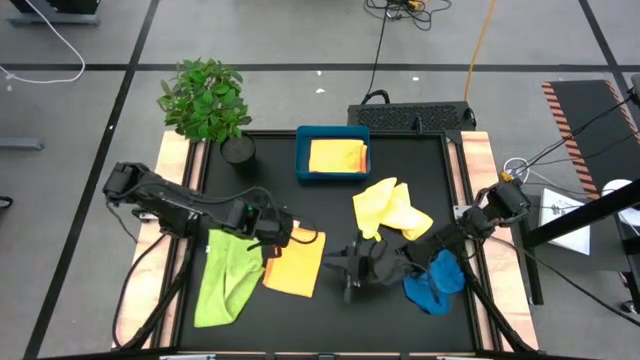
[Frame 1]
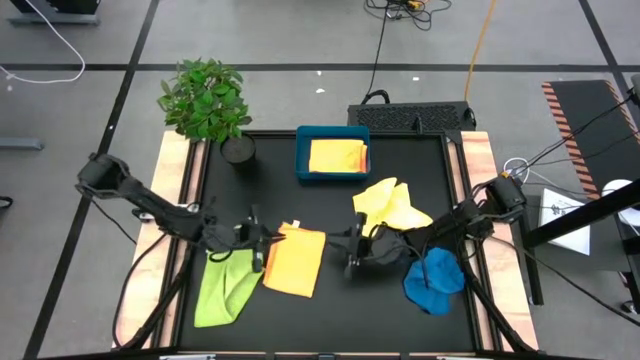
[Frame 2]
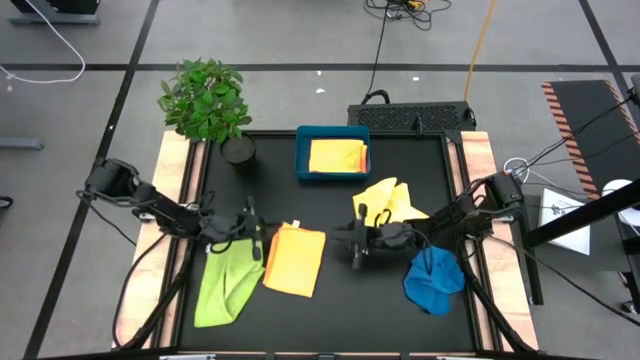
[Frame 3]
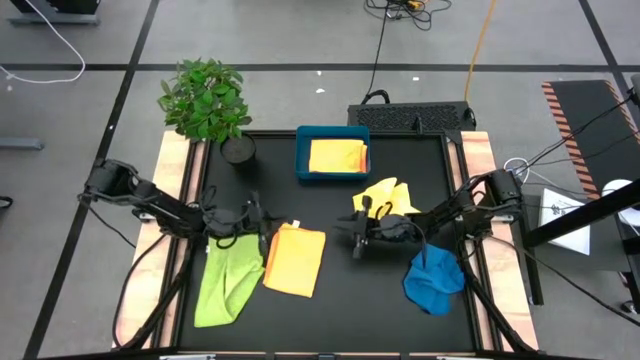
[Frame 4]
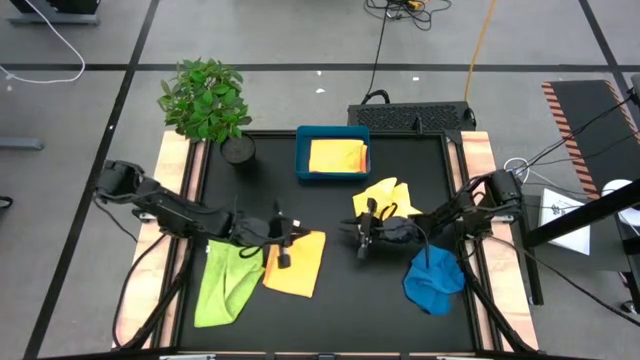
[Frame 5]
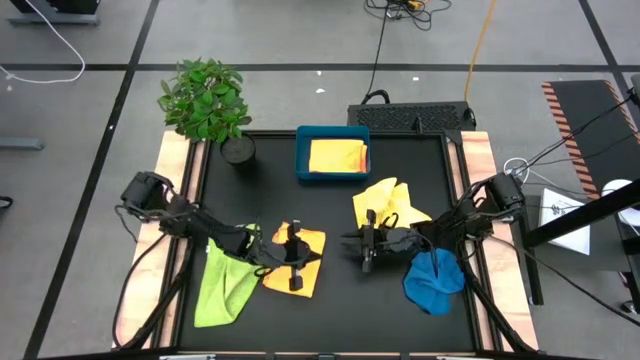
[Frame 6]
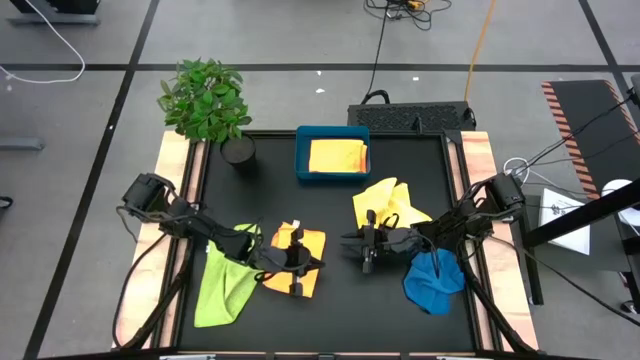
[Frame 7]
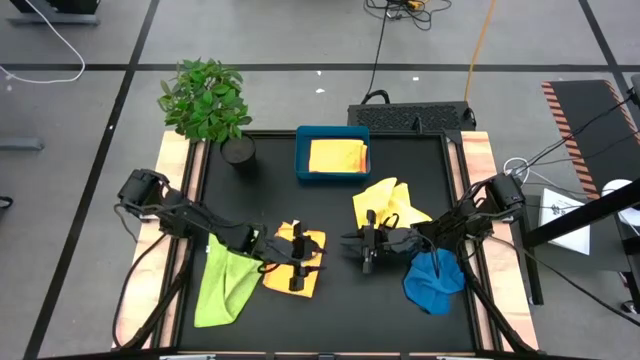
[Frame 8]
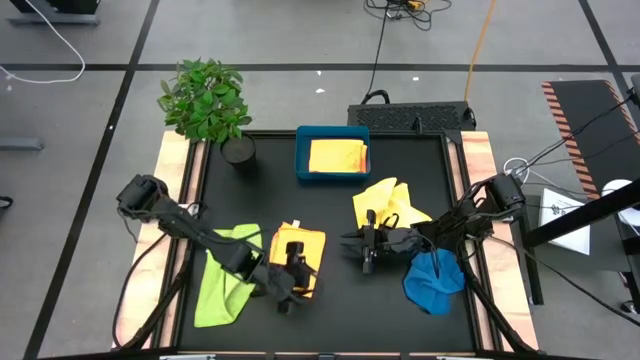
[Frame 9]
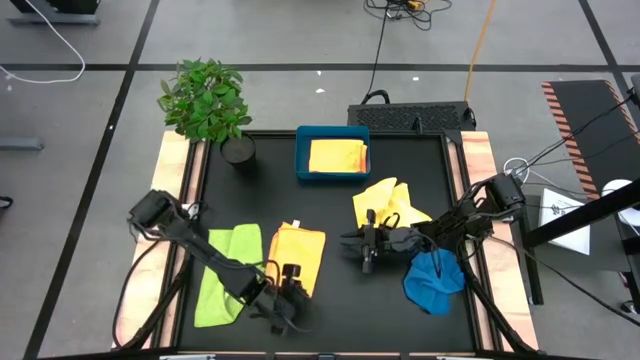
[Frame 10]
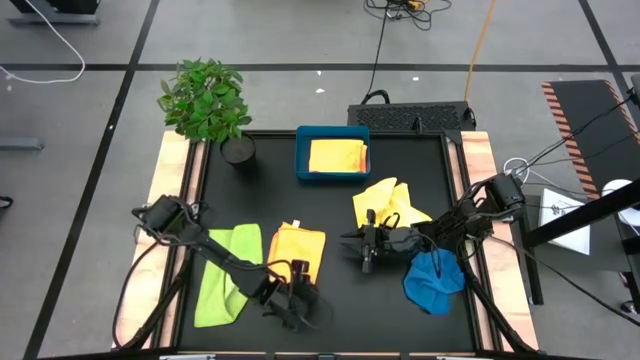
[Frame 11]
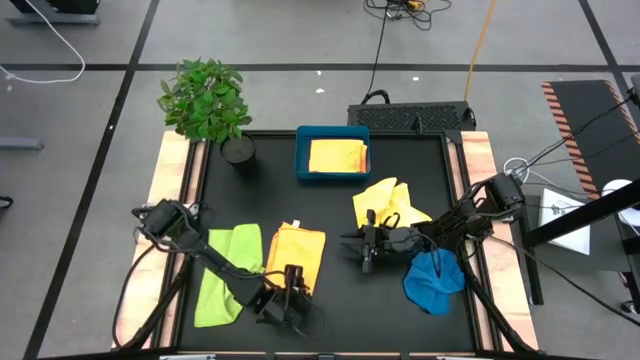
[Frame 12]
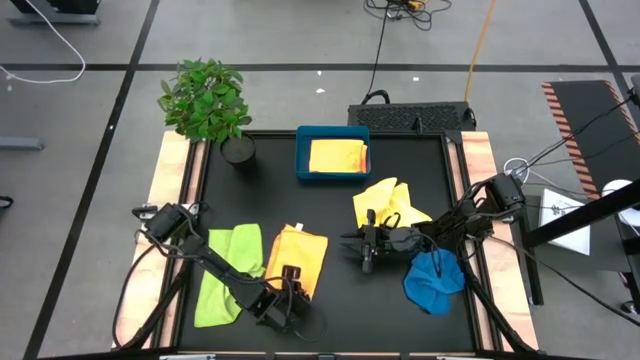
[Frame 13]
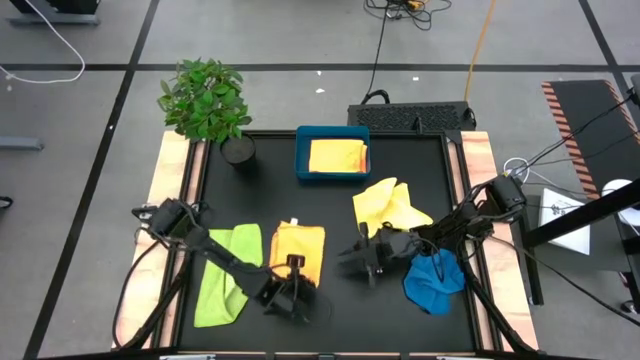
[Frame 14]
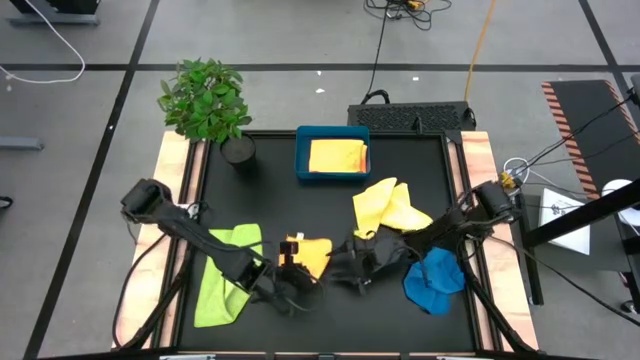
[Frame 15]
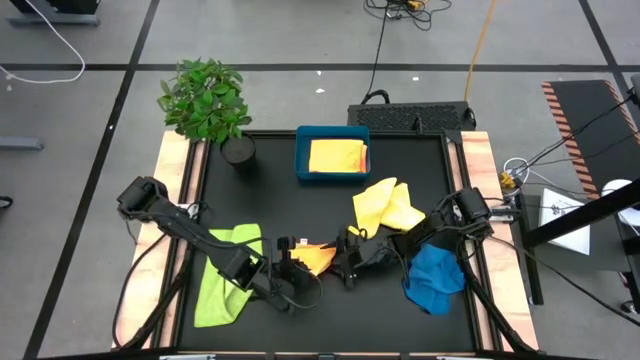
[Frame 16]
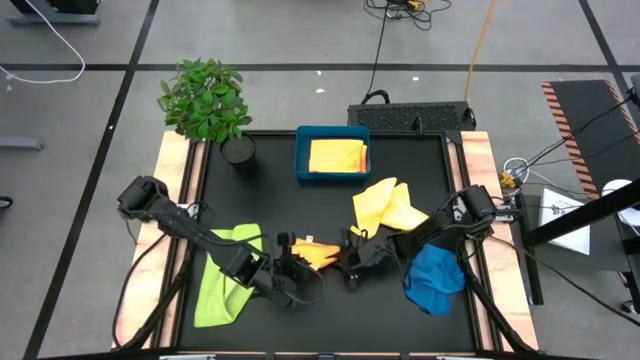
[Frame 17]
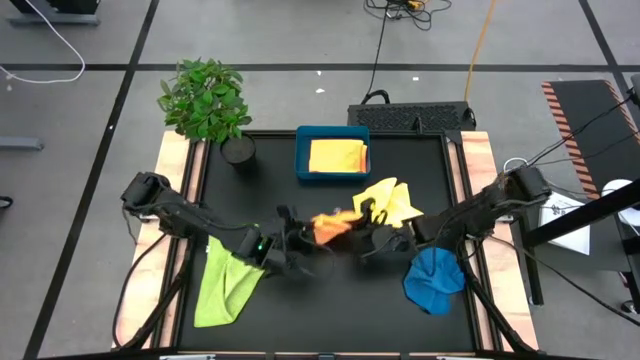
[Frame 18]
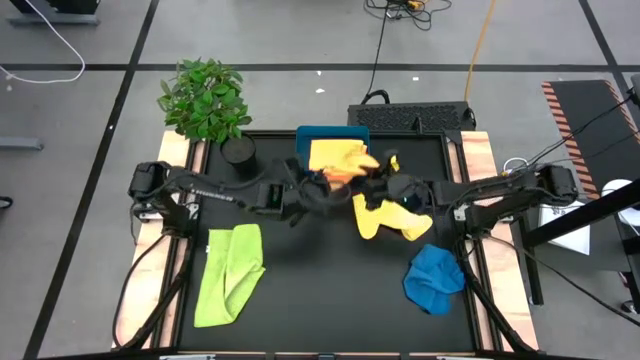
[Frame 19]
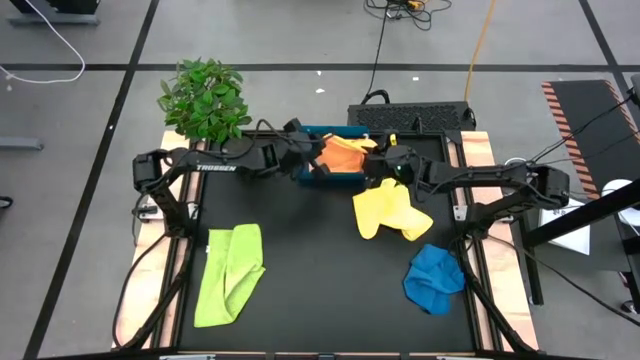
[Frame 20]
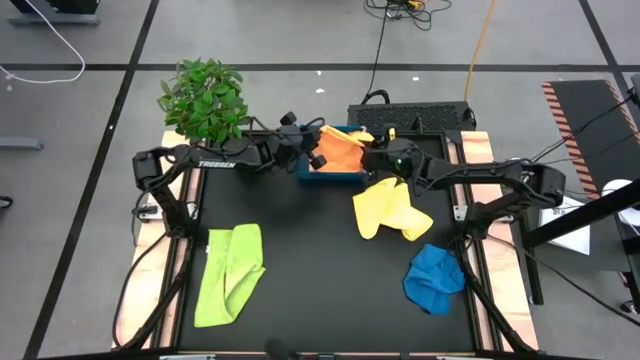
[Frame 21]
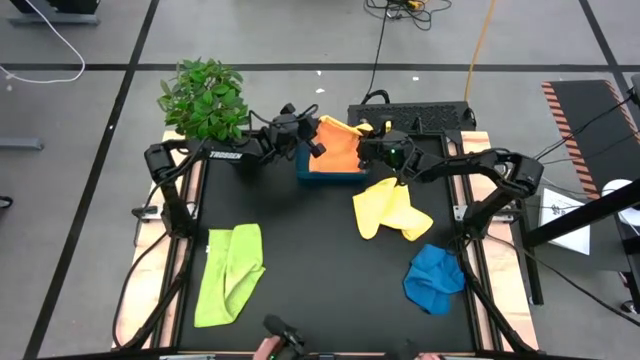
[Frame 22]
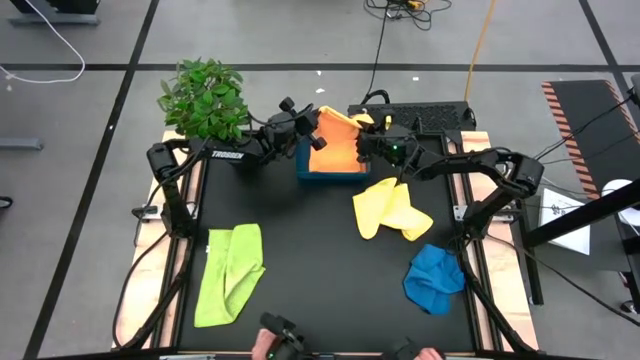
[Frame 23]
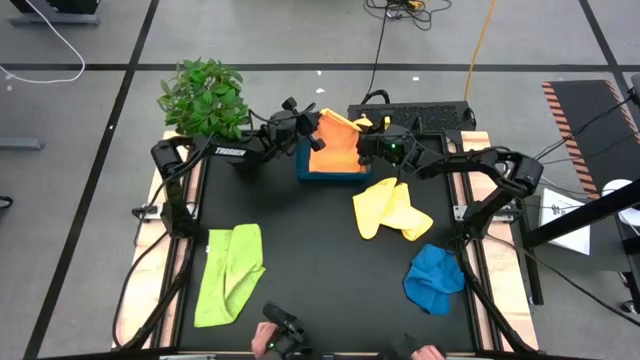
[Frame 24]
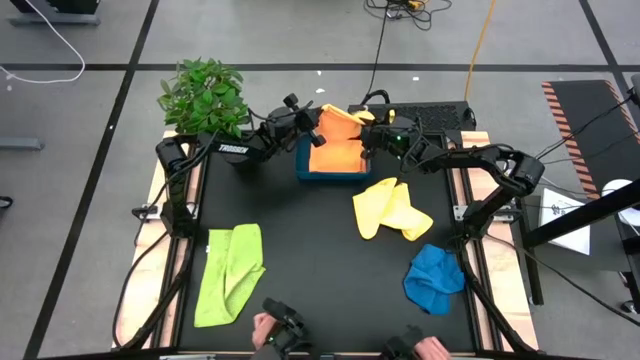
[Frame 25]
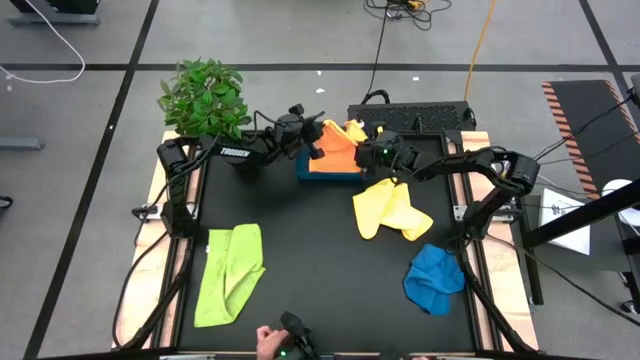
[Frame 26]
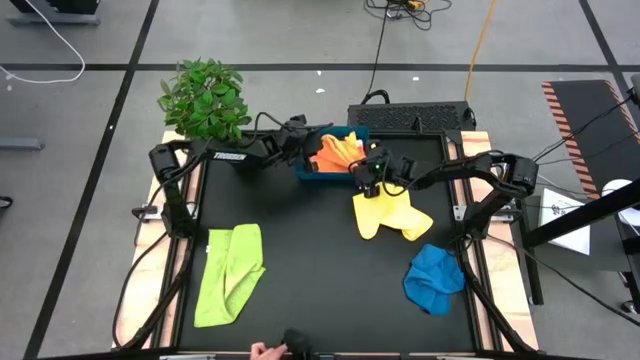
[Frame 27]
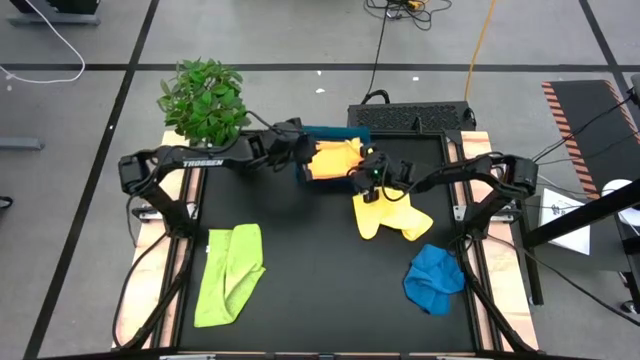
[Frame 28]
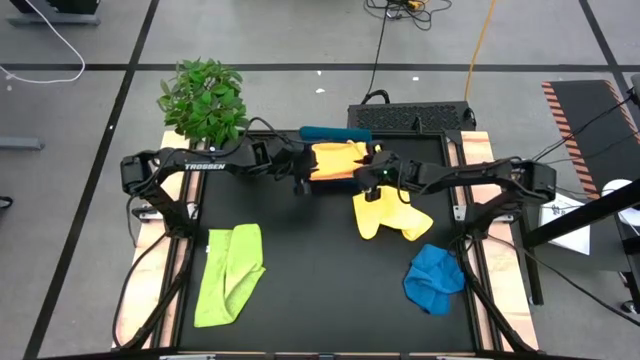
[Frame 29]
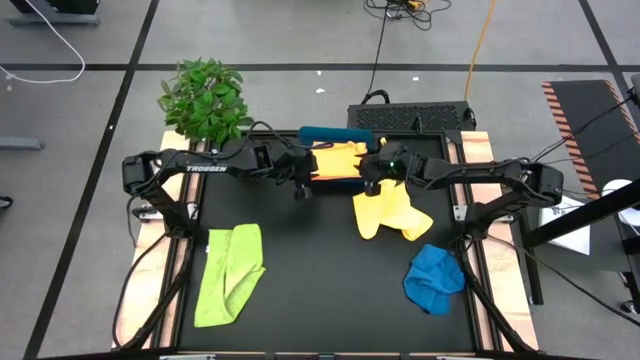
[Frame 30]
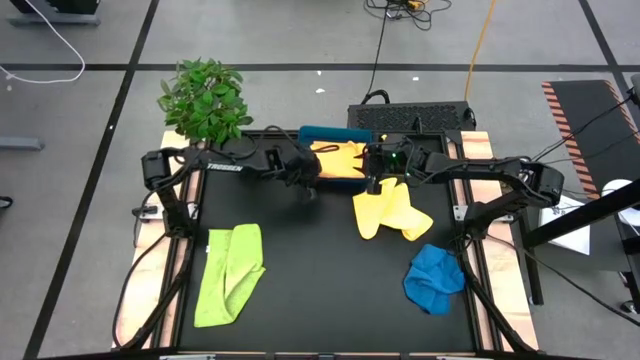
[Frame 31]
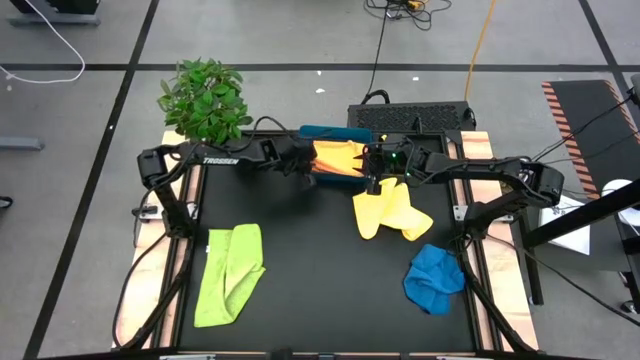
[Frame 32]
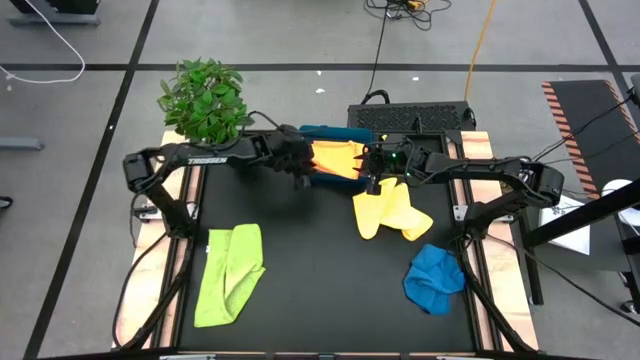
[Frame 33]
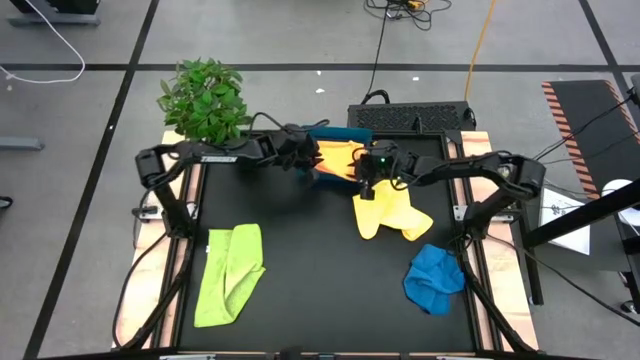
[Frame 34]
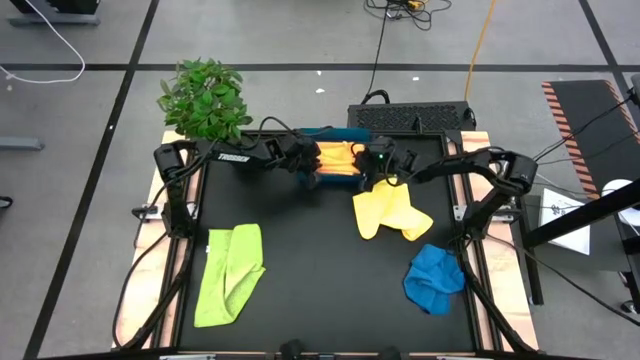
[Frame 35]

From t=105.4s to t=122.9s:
Task: Fold microfiber towels
Put the orange microfiber towel into the blue bin

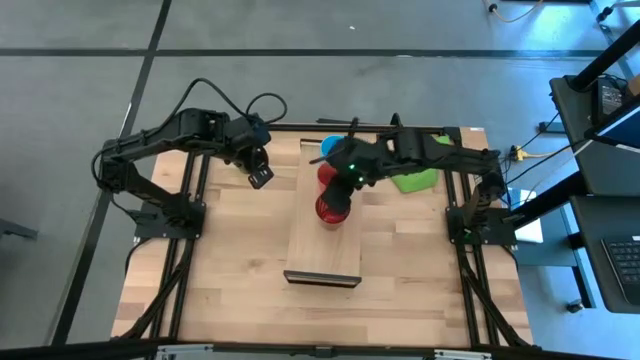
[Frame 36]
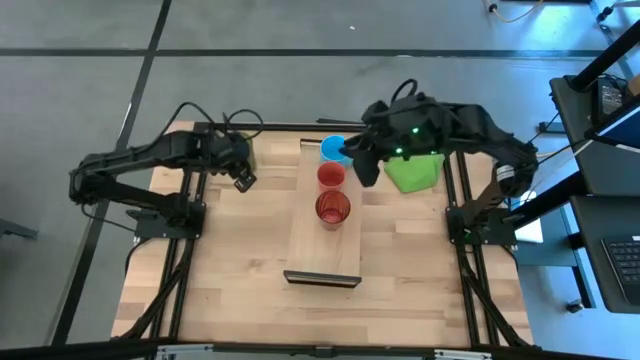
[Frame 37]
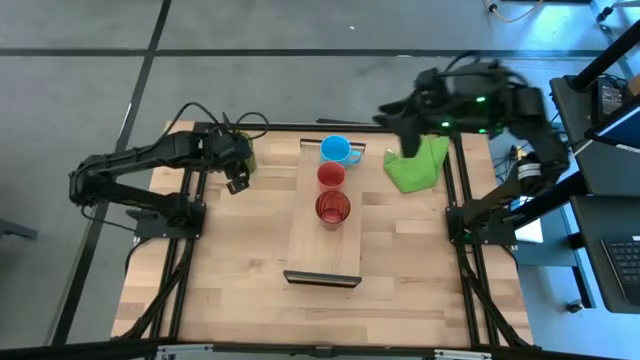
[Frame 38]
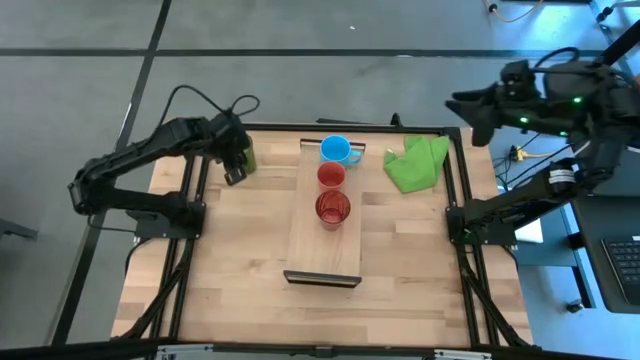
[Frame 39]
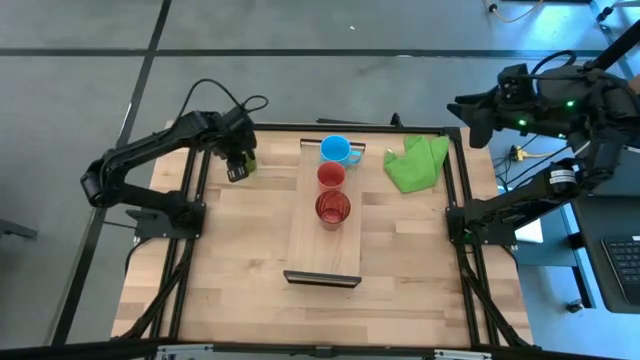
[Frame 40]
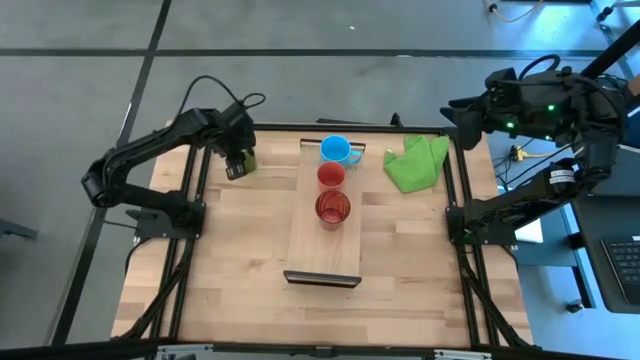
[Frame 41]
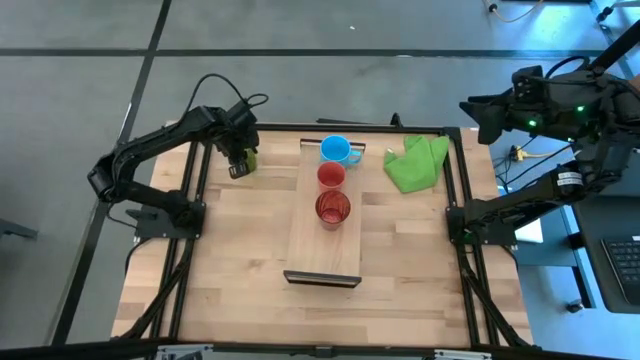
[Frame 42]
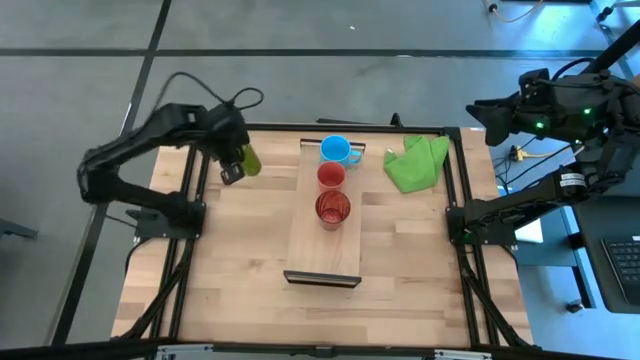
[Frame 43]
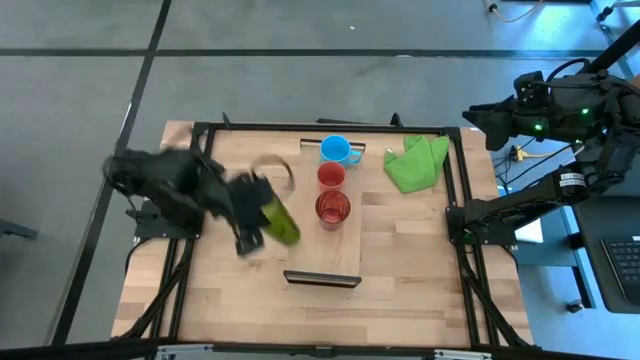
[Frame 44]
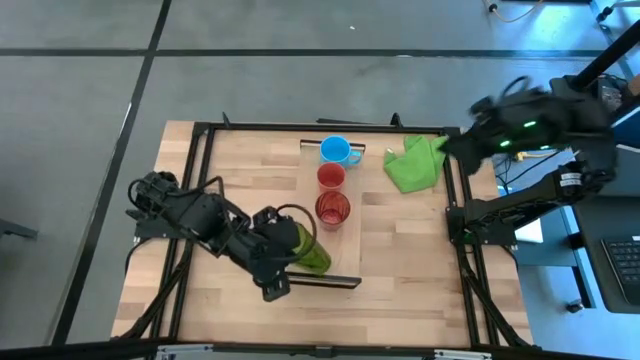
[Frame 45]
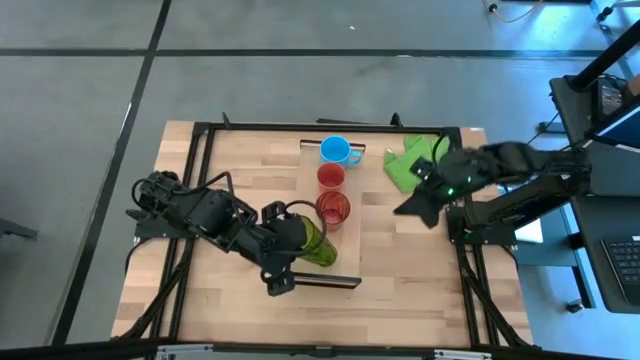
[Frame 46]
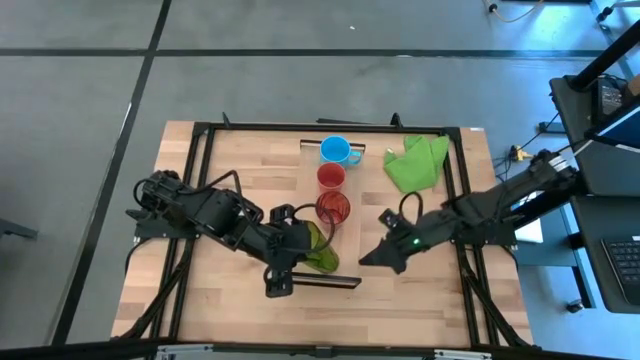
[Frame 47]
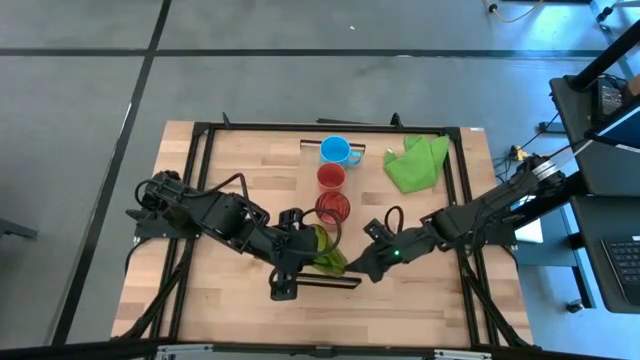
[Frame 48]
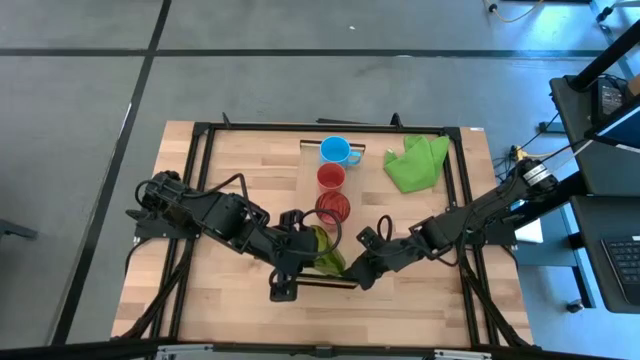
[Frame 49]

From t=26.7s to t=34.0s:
Task: Stack small to large cups/mugs on shelf
Put the green cup on the shelf
